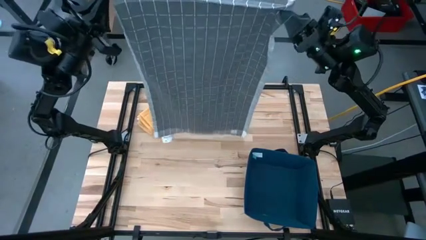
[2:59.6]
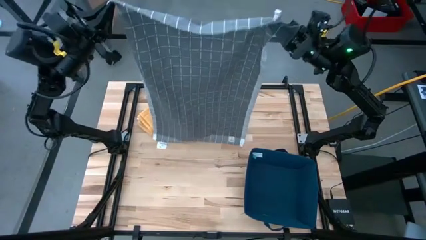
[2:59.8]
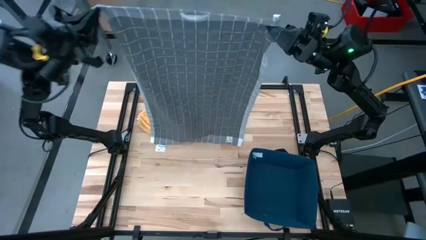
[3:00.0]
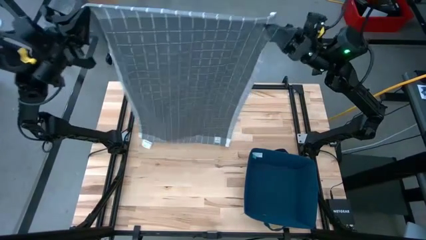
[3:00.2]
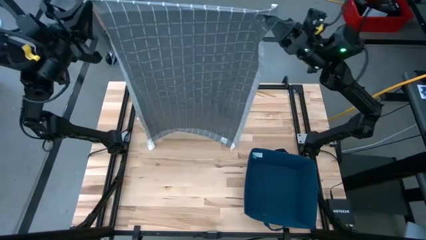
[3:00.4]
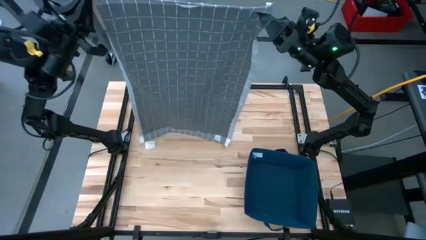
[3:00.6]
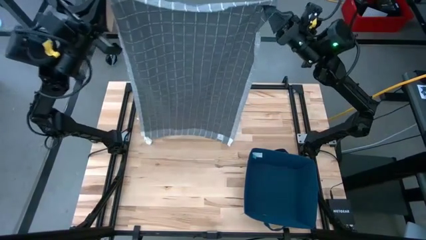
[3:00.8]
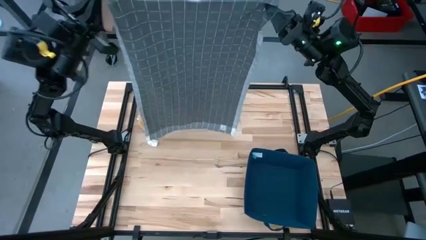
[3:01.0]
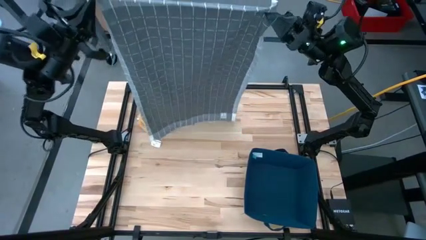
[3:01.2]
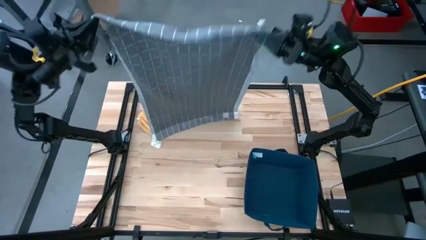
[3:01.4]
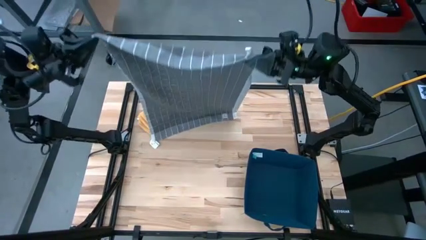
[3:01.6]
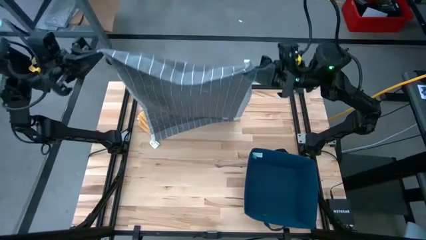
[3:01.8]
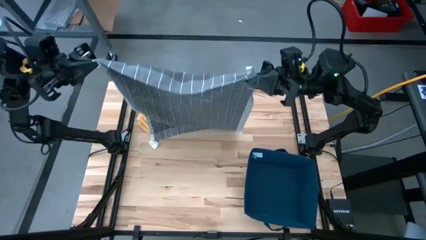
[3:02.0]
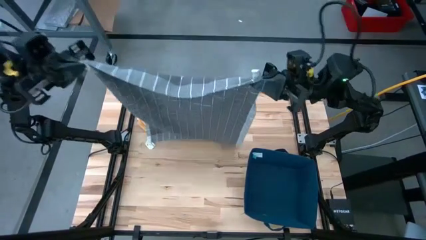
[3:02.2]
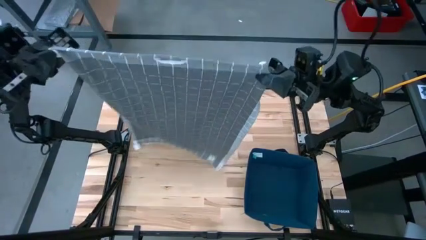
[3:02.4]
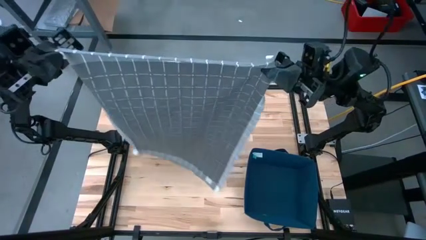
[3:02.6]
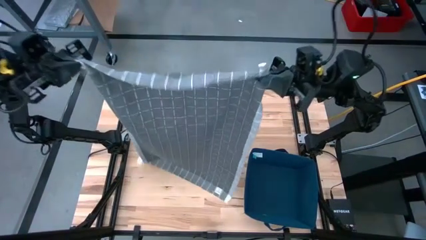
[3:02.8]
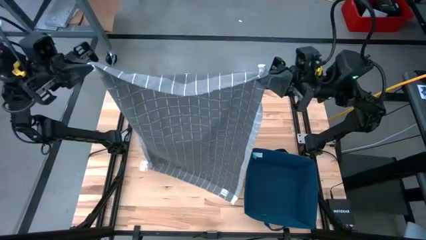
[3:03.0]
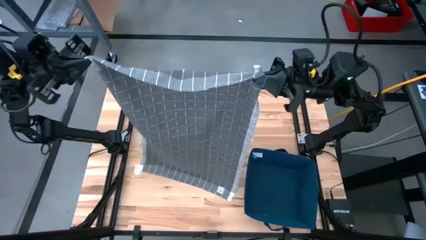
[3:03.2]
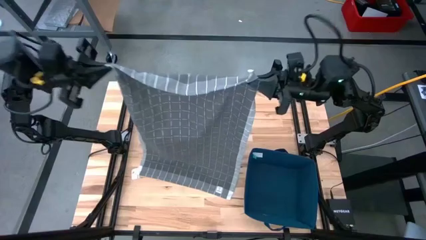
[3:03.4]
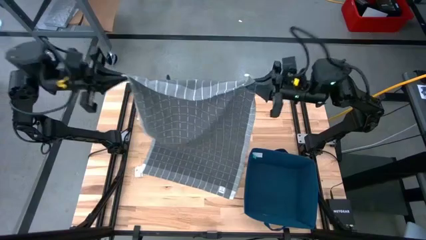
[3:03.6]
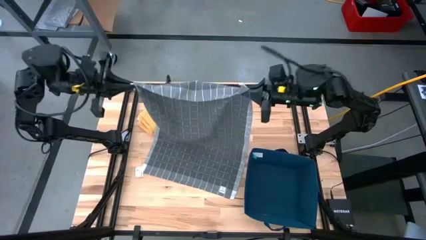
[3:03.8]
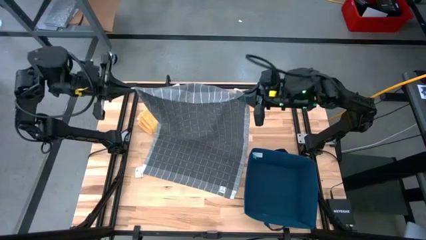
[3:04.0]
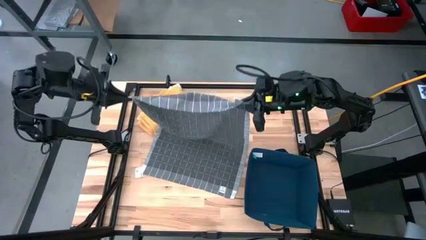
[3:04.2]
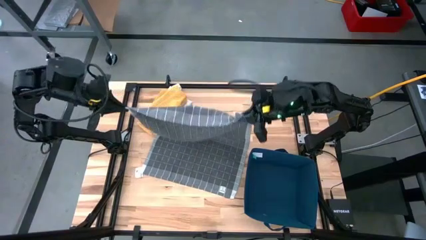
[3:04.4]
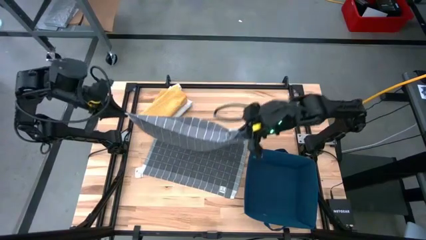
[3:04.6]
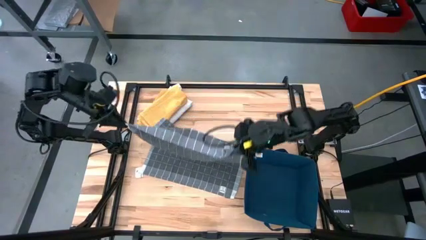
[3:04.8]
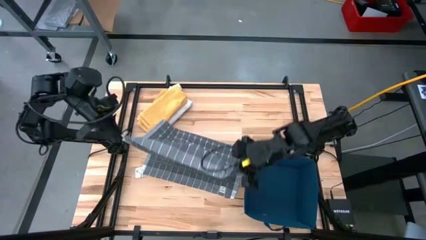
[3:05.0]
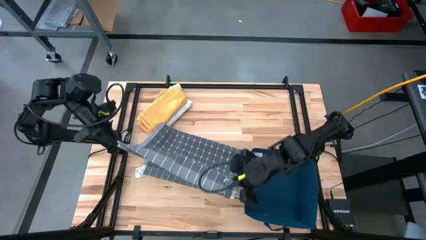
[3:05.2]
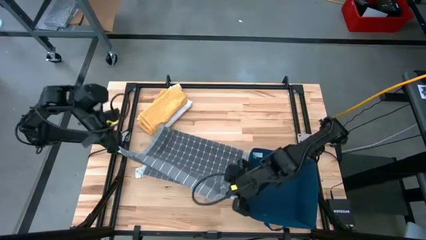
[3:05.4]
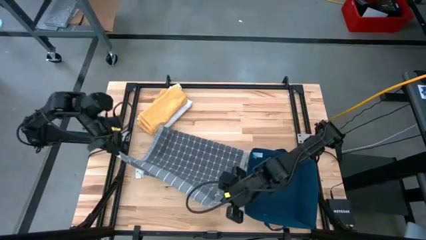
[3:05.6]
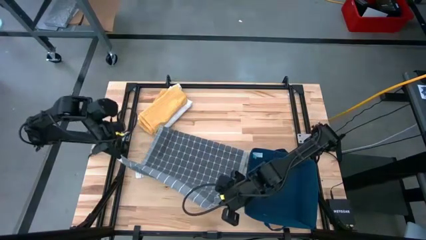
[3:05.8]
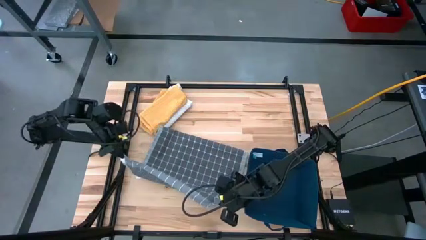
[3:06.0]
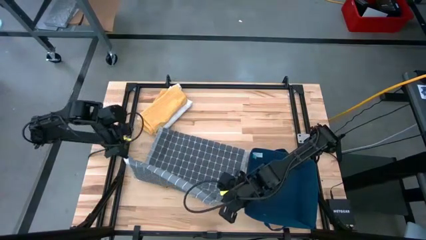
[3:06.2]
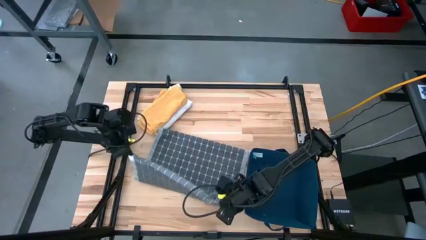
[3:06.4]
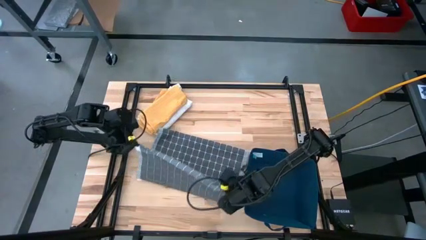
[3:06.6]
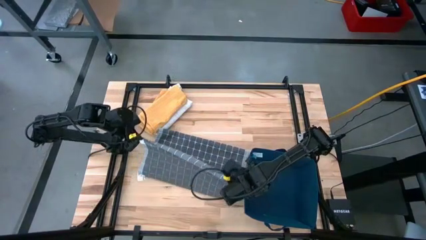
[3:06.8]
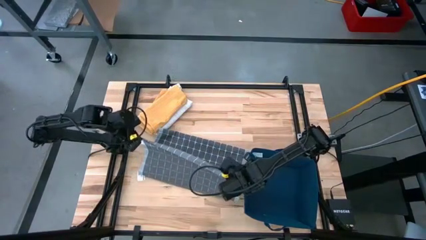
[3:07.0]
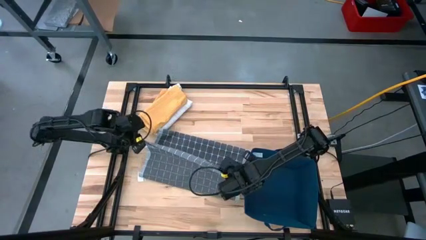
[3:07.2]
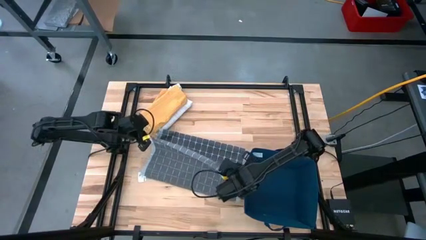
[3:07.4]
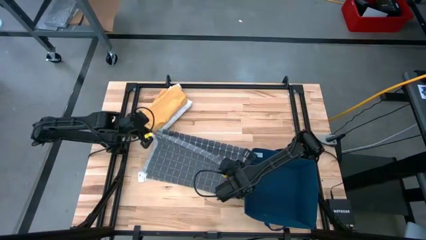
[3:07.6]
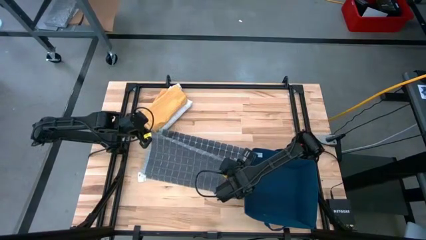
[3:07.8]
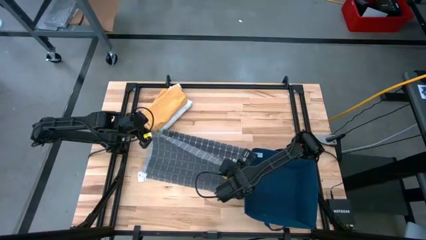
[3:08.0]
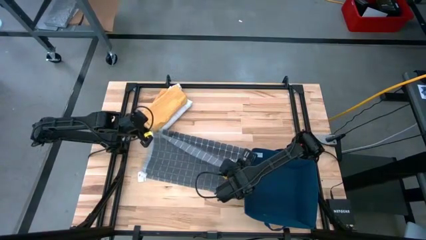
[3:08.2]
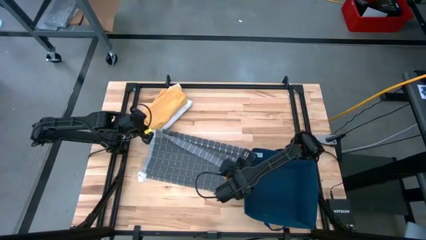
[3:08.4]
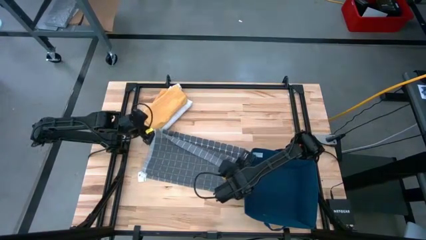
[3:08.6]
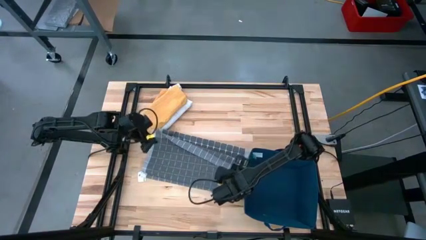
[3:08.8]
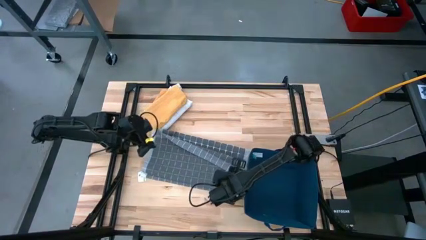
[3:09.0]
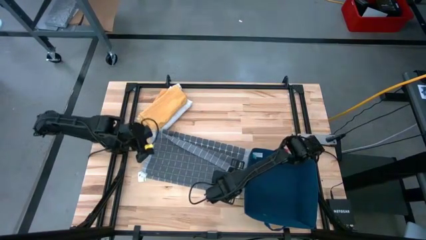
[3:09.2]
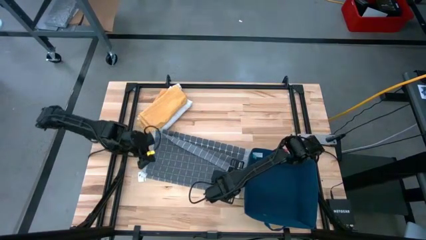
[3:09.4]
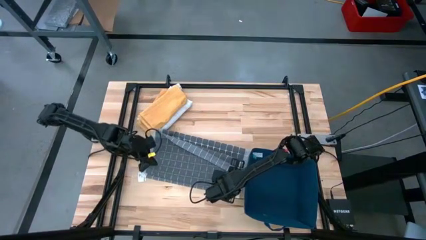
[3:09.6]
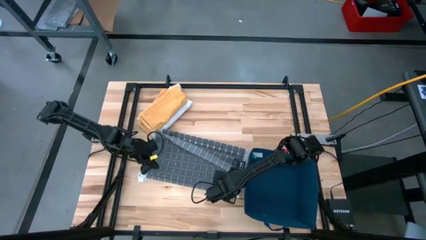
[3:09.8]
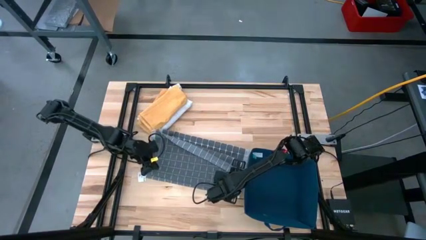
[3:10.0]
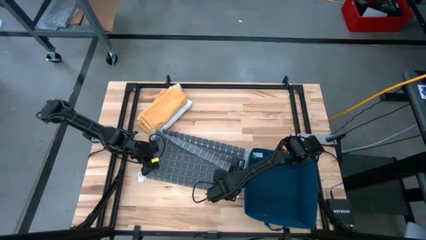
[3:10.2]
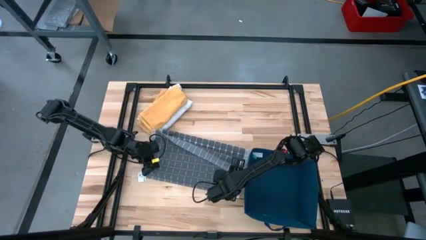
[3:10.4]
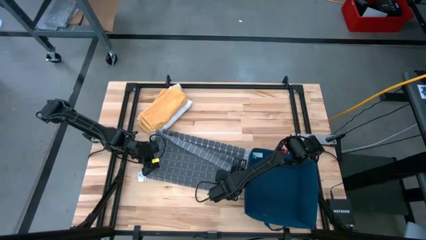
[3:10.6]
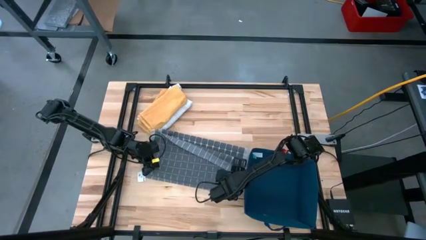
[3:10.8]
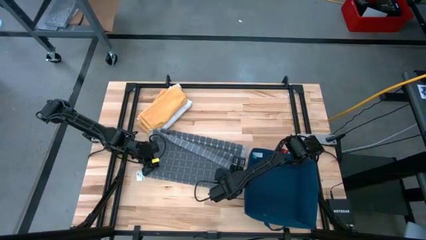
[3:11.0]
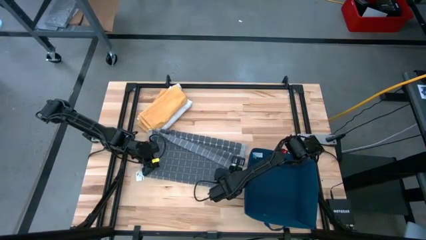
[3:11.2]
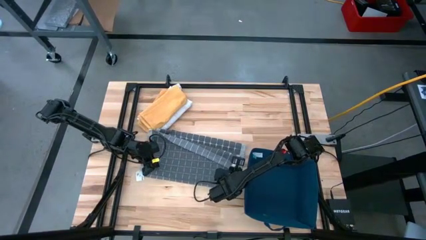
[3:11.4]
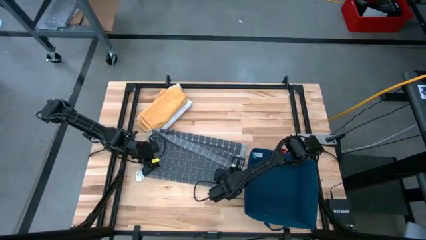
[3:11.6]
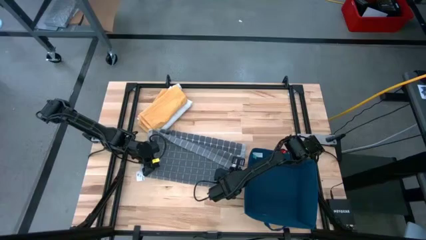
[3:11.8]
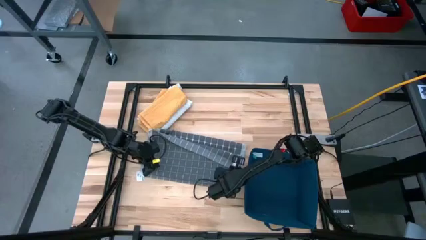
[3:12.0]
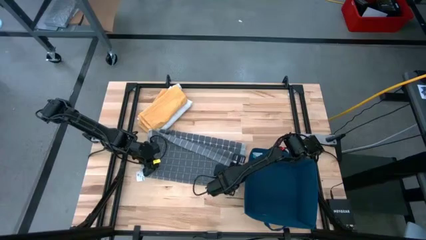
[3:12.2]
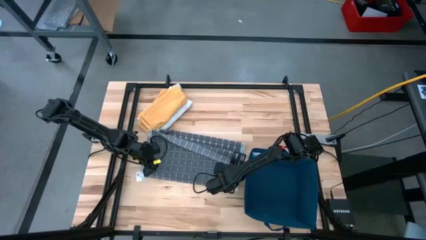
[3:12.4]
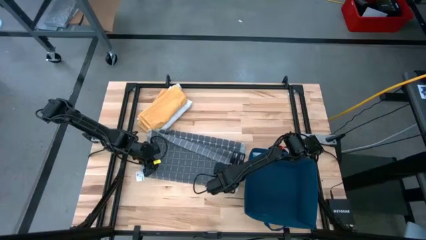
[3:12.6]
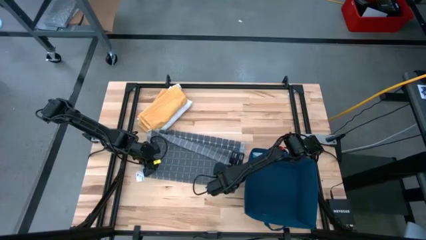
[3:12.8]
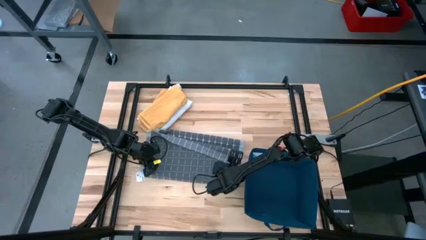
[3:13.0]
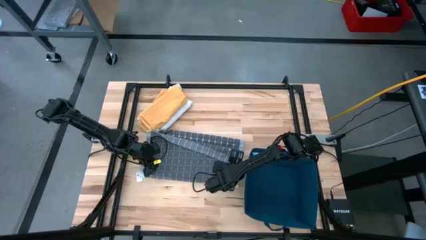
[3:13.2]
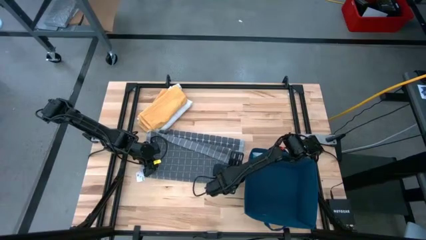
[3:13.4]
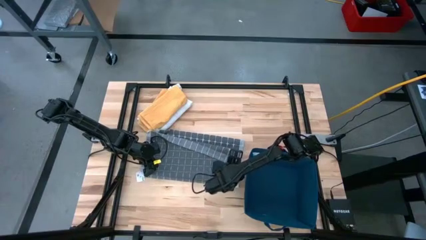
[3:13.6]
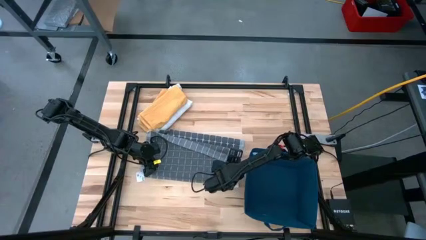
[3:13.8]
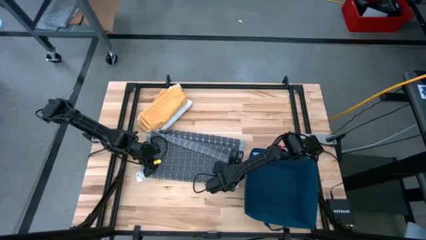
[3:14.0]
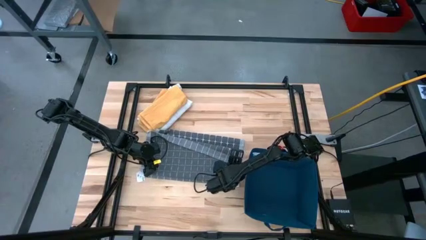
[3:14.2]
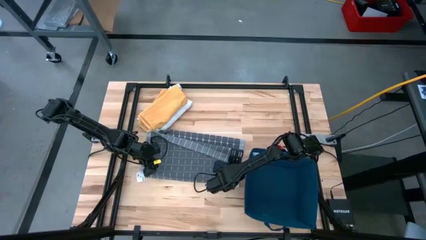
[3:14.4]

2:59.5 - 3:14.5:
Task: Fold towel
Fold the gray towel
